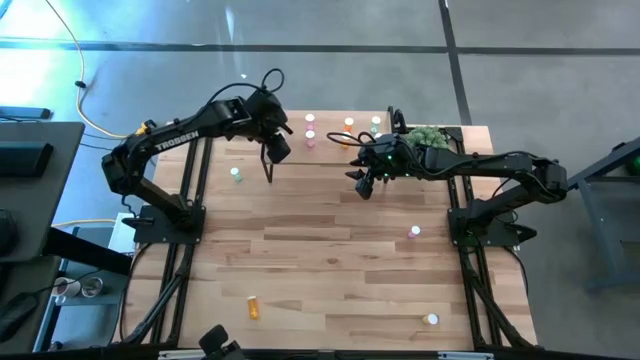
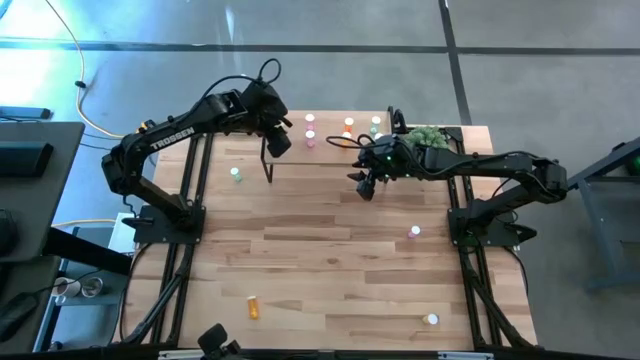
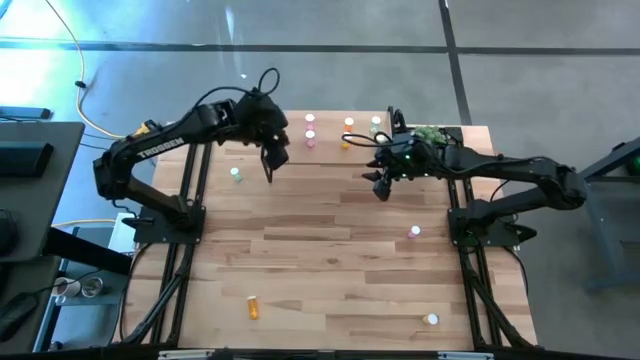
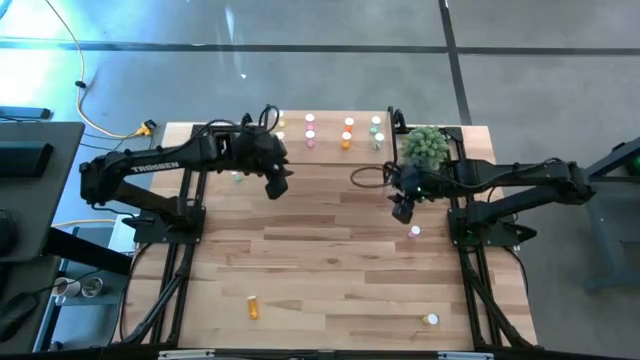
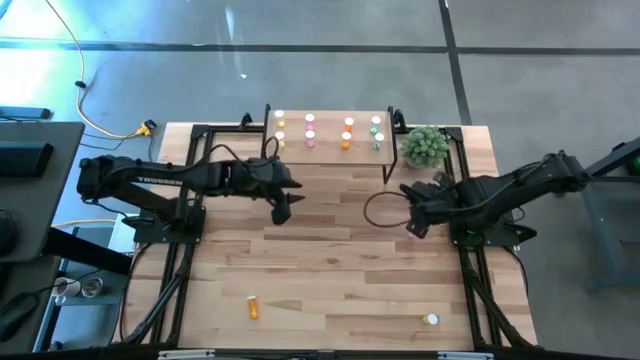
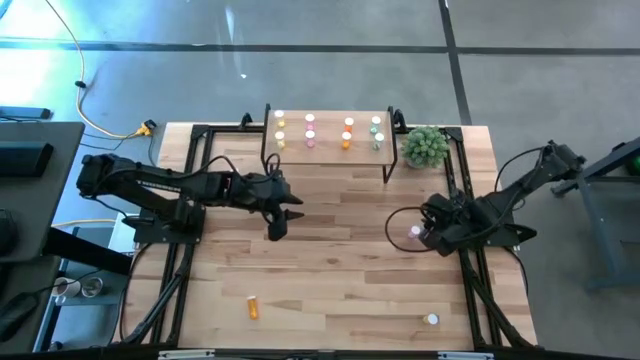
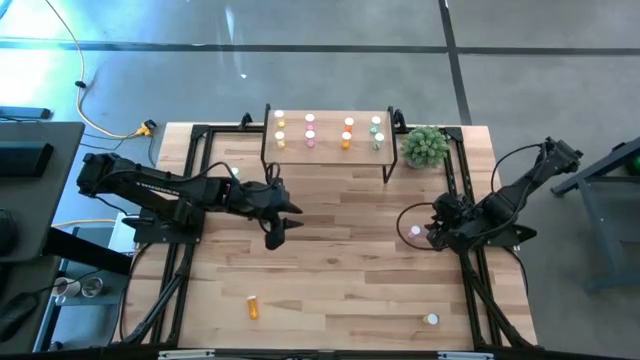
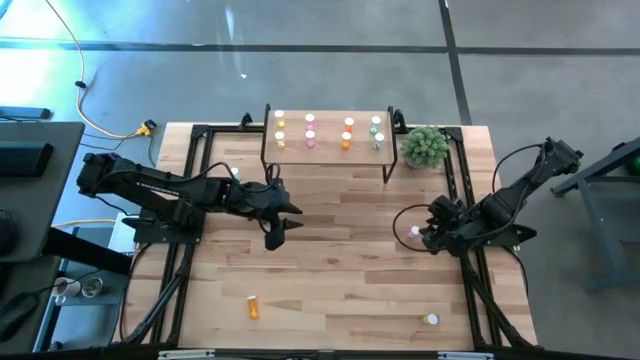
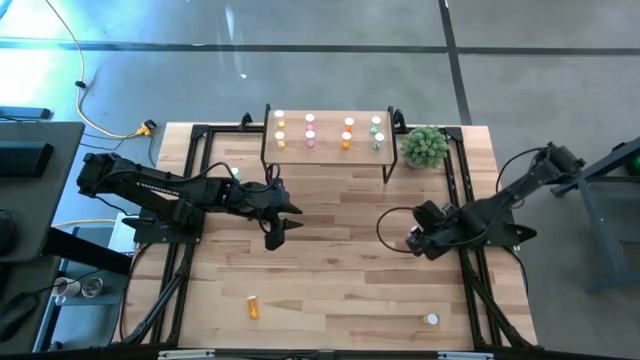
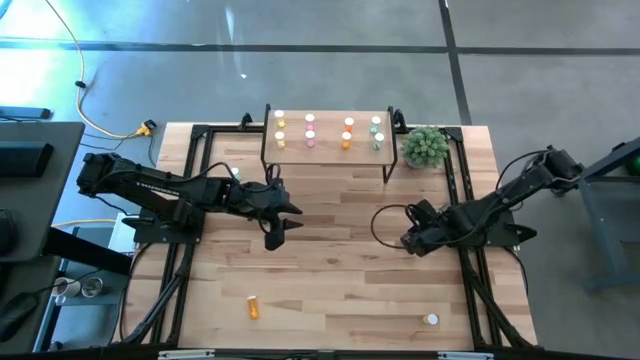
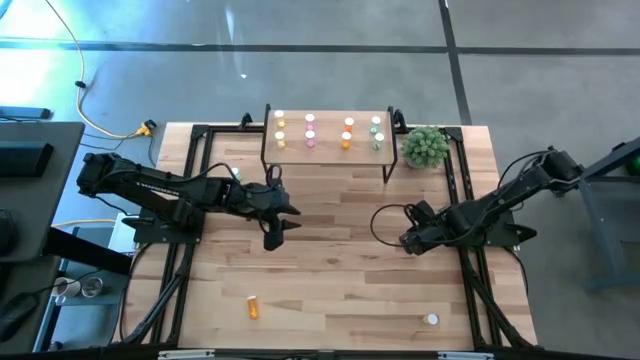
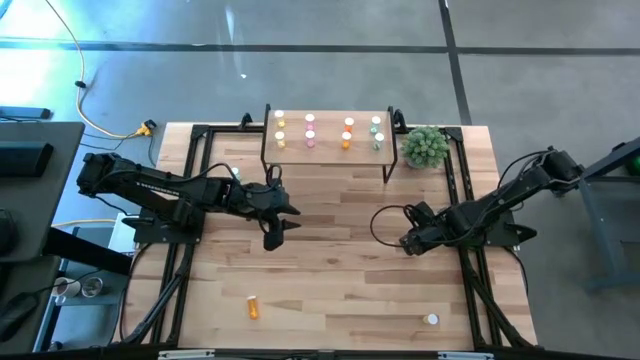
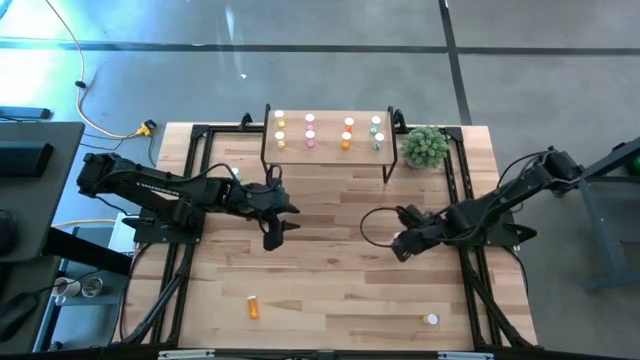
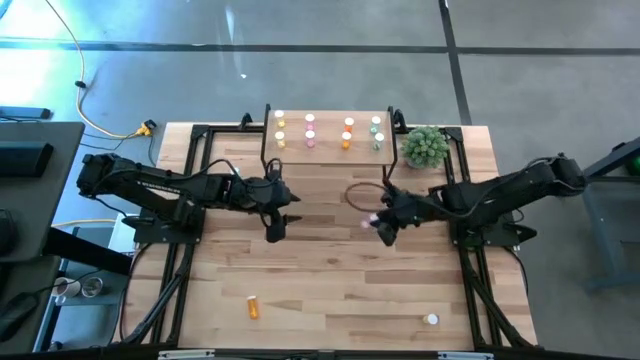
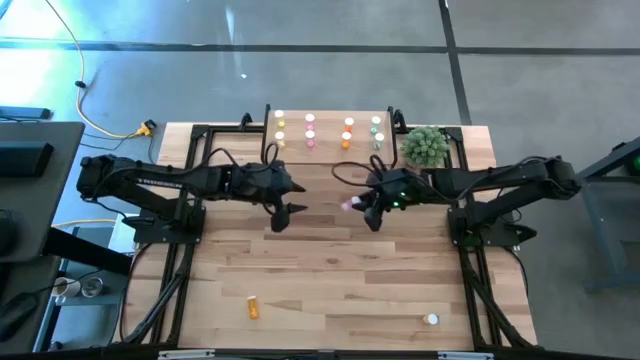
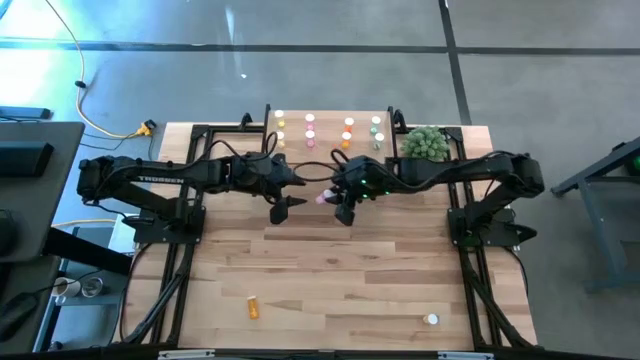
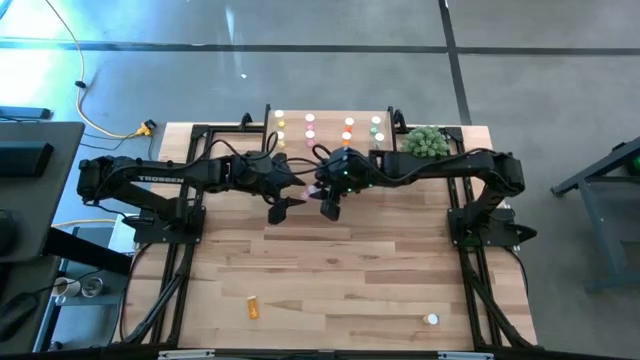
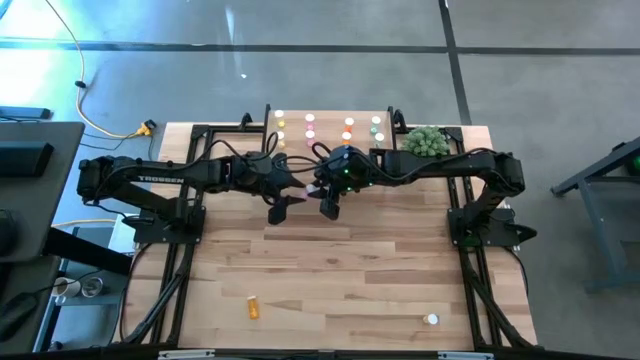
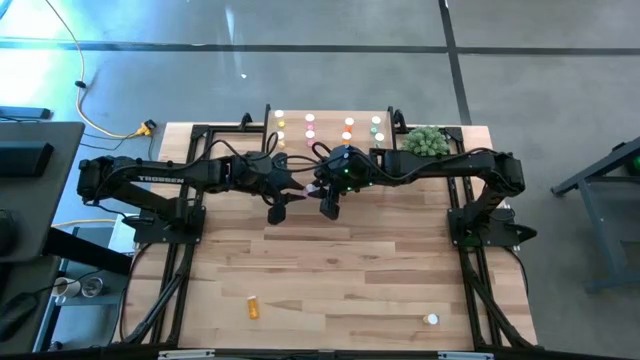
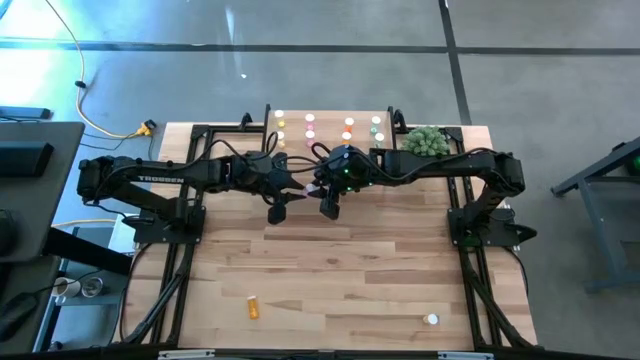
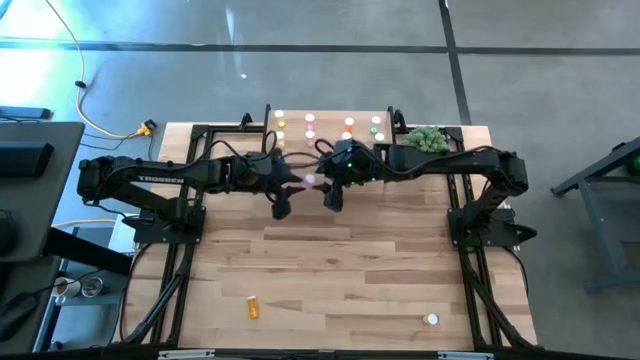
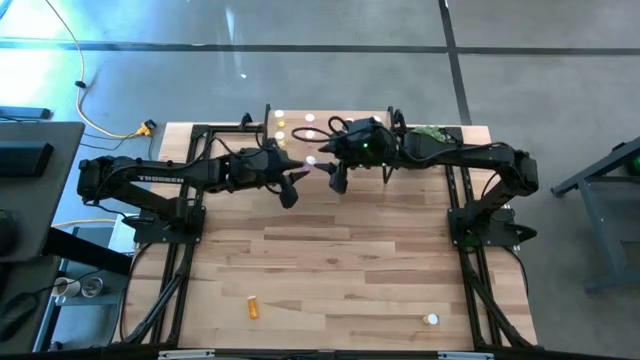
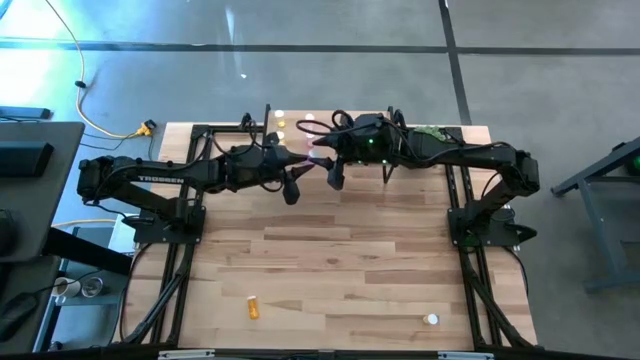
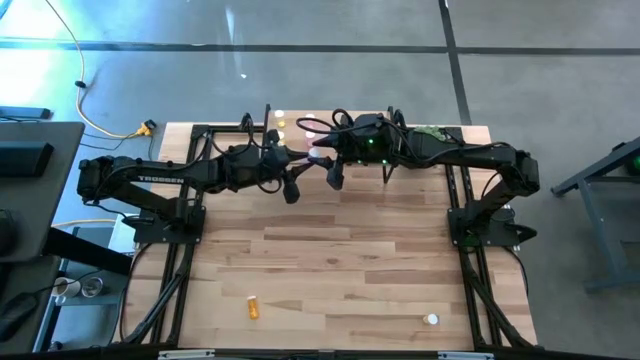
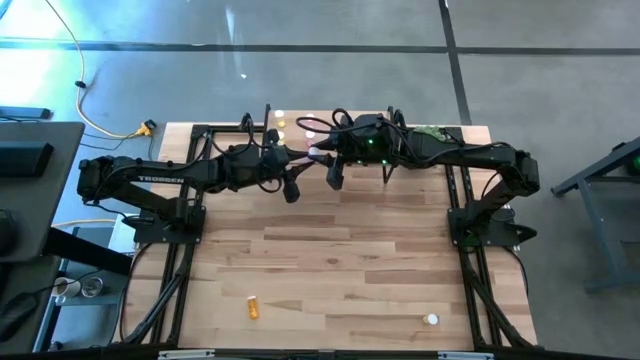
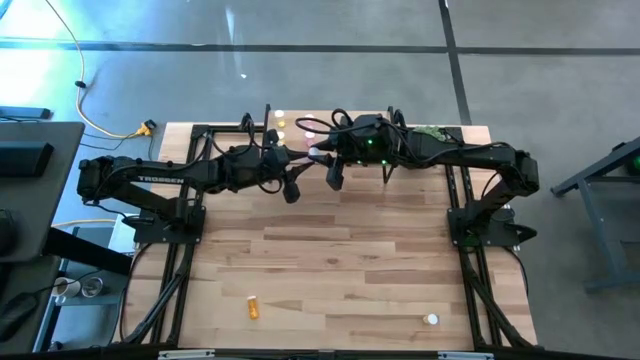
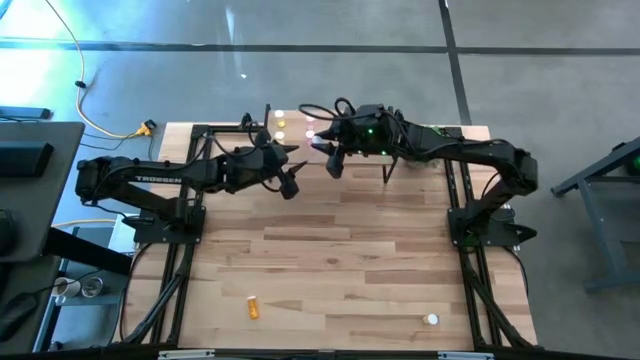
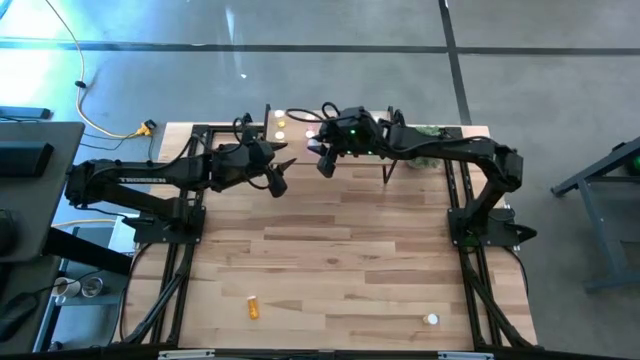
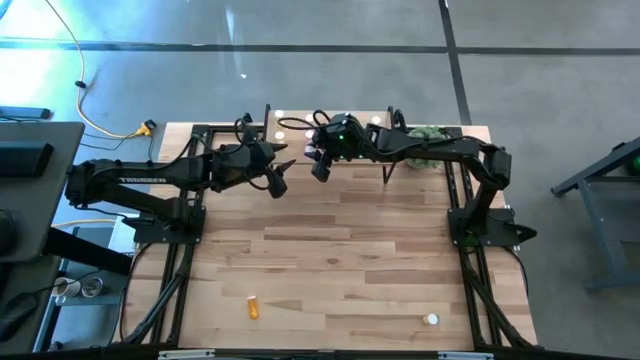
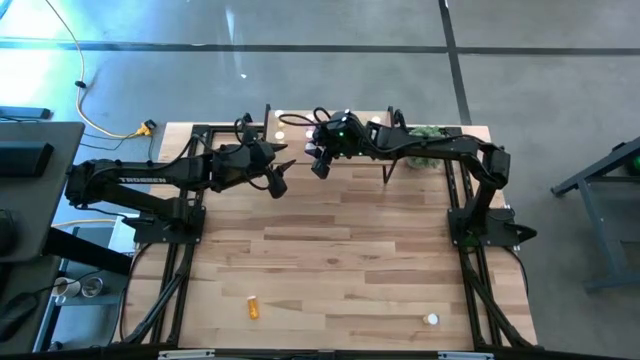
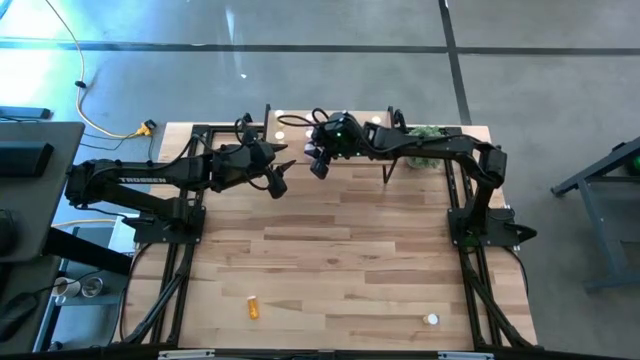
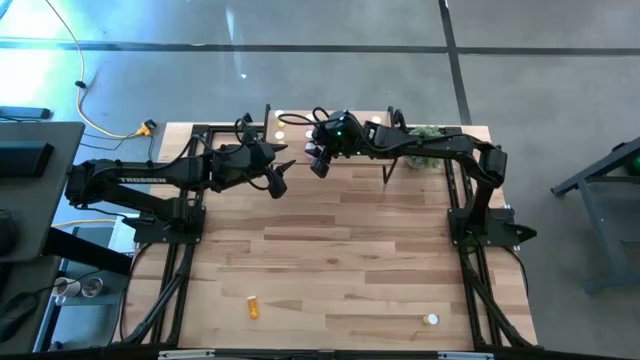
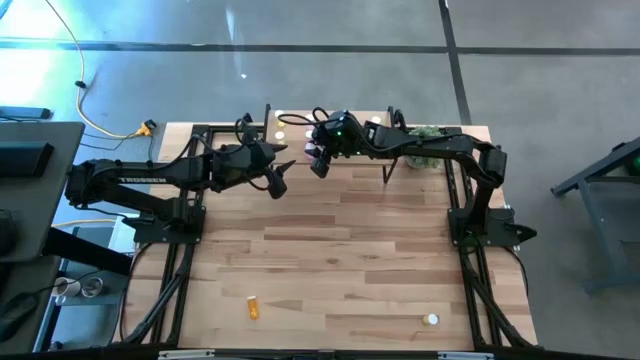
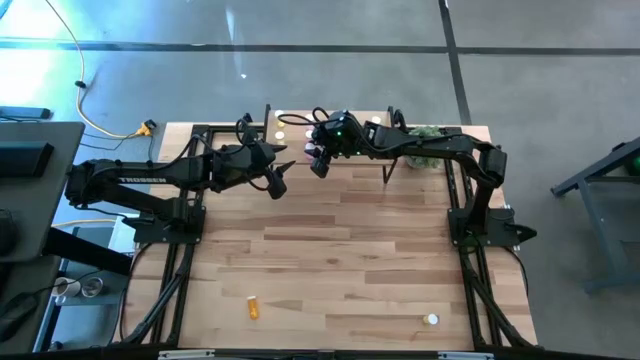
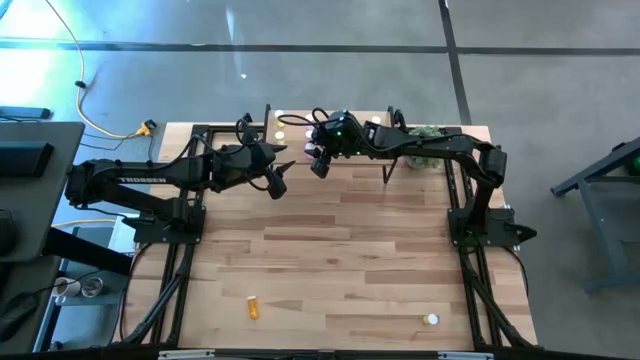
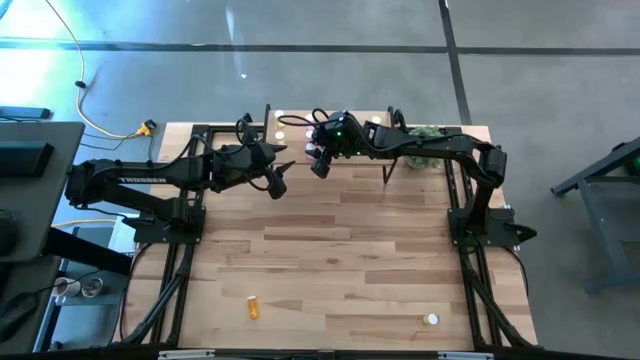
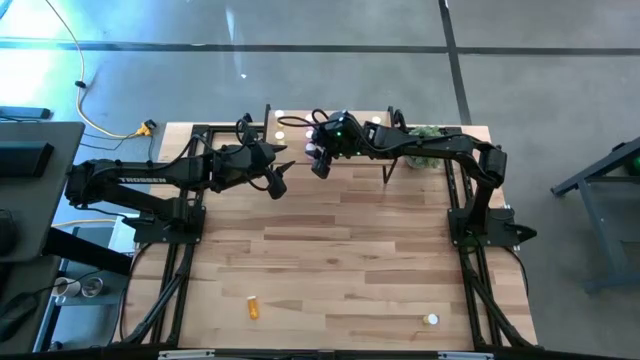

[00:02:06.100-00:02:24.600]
Task: Pick and place medicine bottles onto shelf by color
Put the pink pill bottle on the shelf aligned with the other pink pill bottles

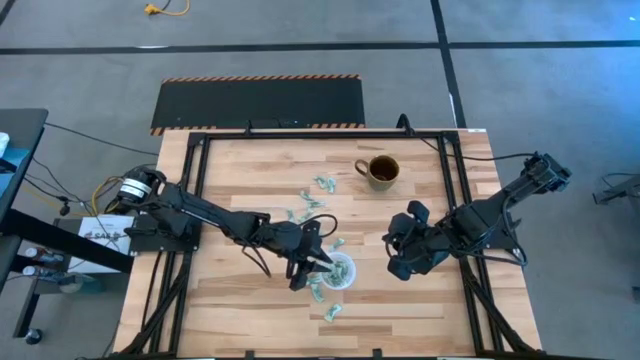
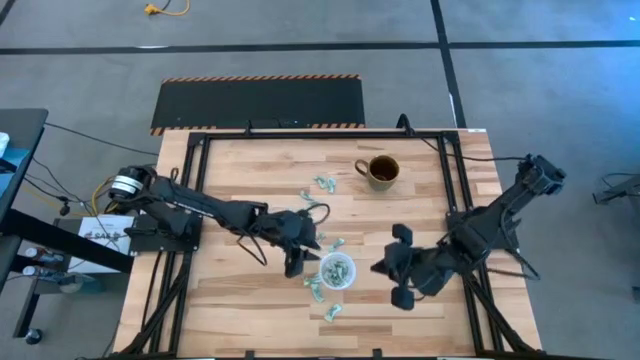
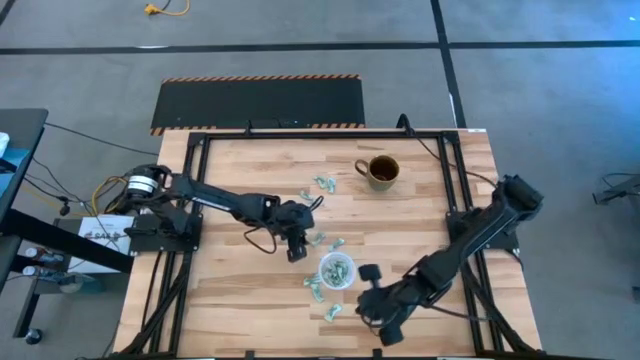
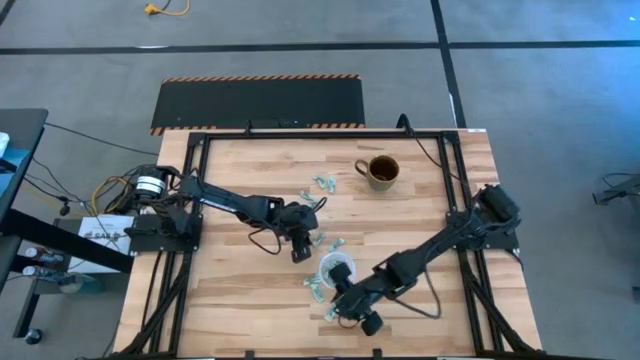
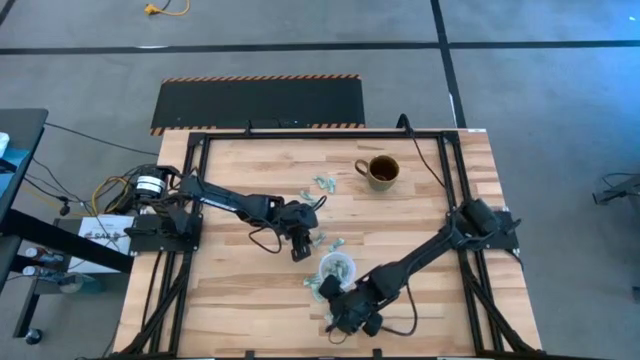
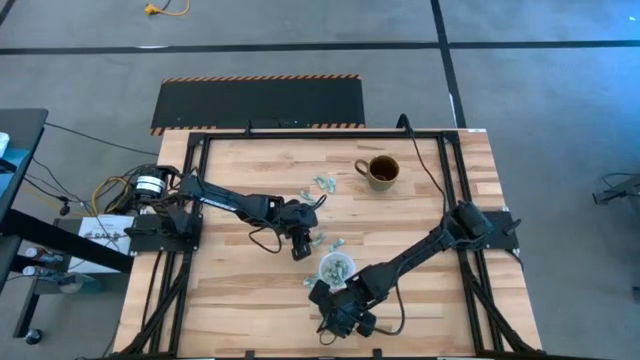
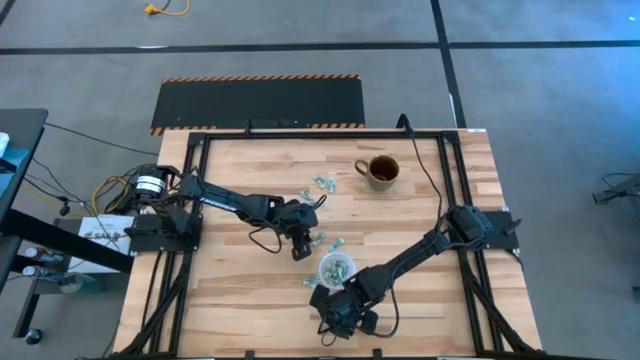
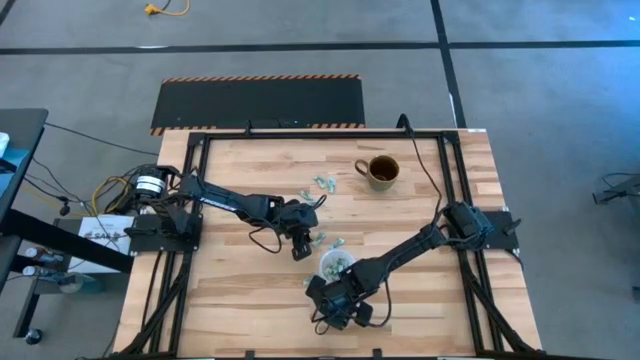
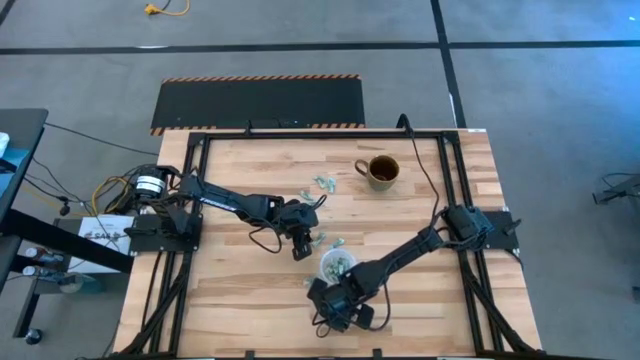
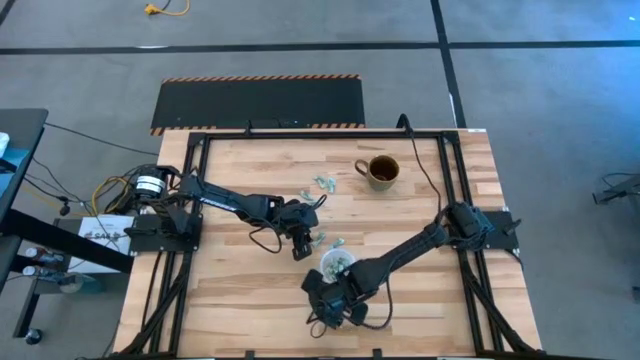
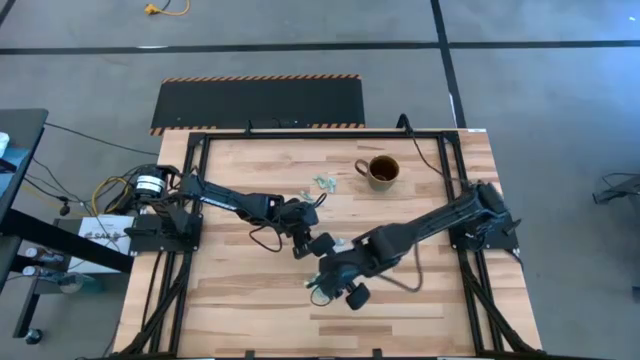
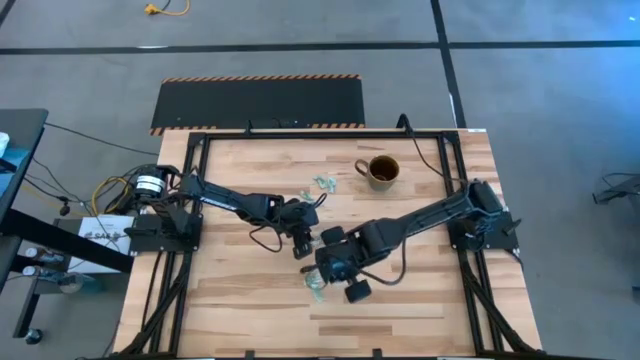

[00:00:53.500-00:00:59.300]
Task: Pick and place Stevia / Truvia into bins
Put the green stevia packet into the transparent container
